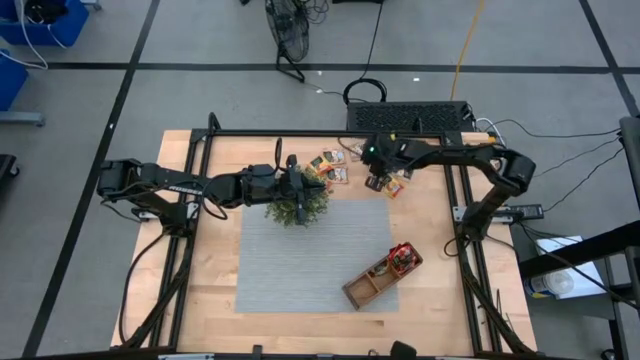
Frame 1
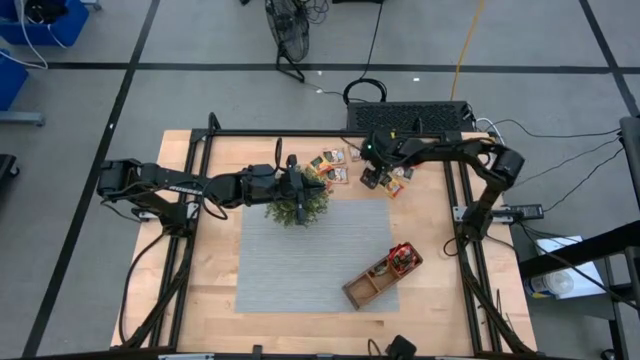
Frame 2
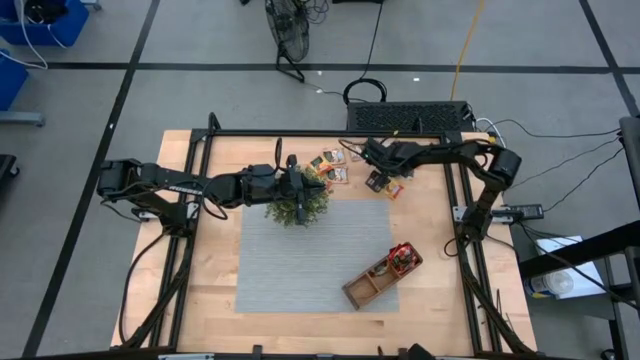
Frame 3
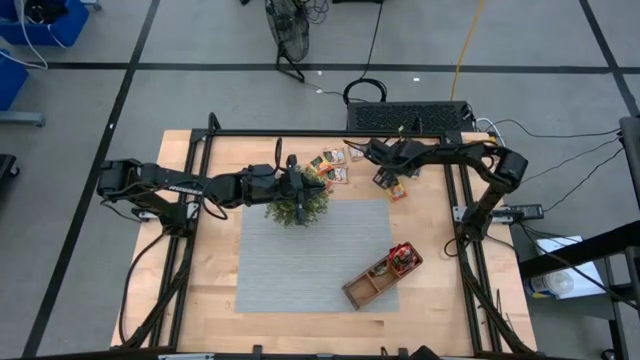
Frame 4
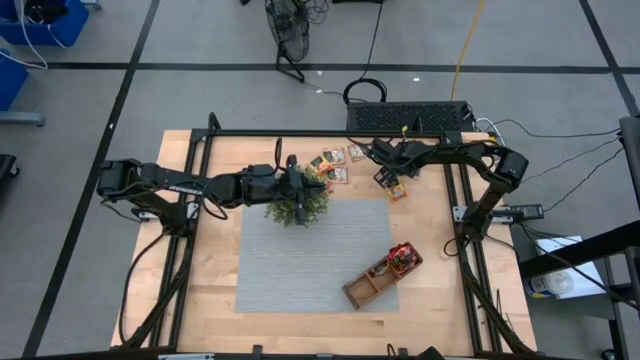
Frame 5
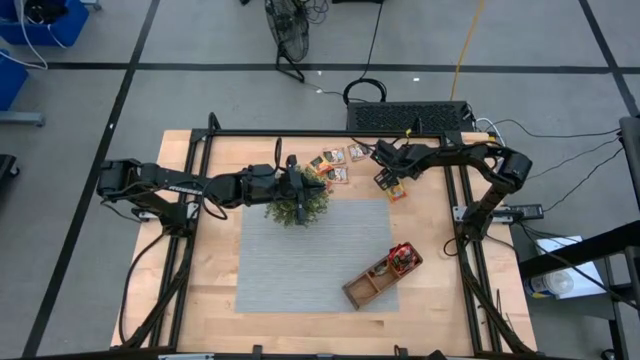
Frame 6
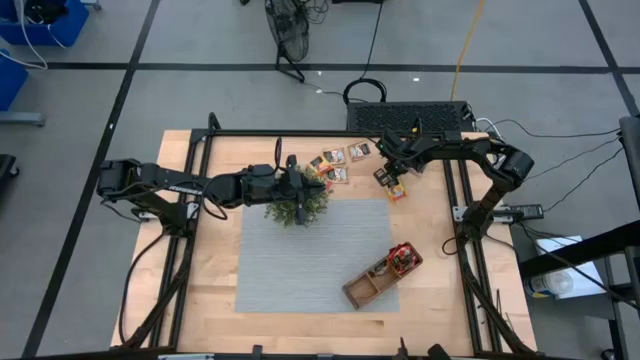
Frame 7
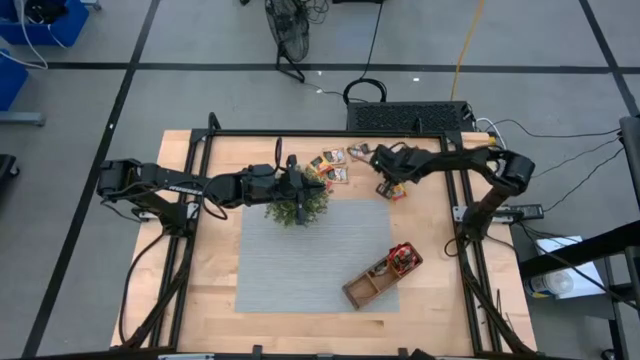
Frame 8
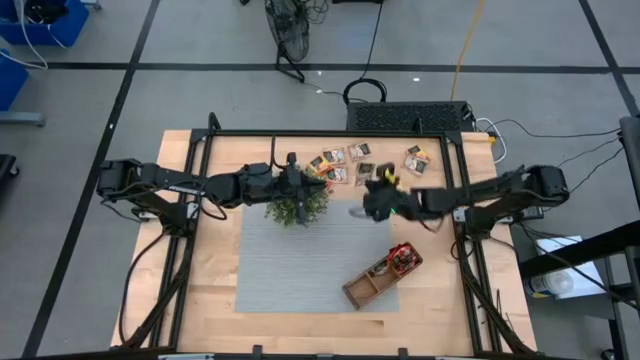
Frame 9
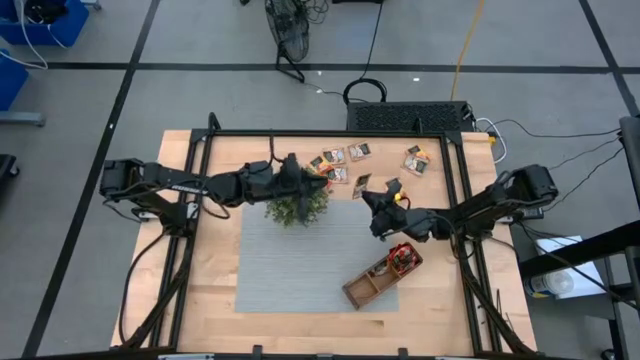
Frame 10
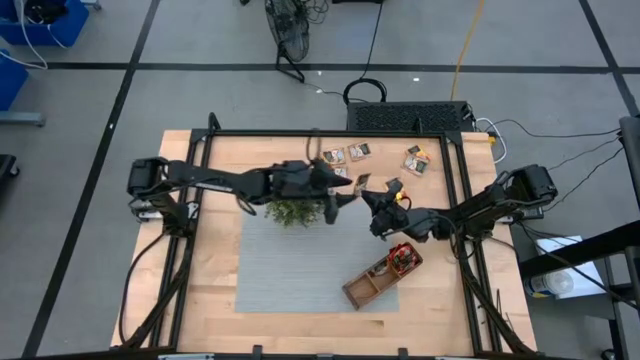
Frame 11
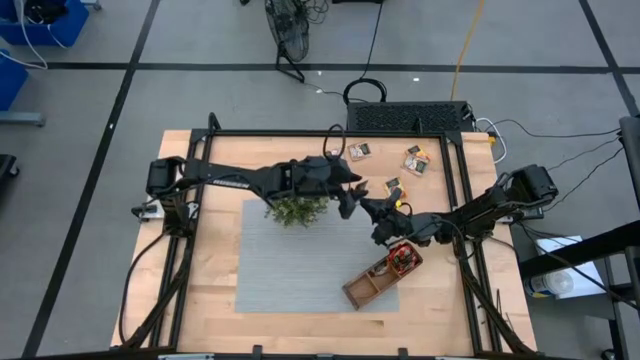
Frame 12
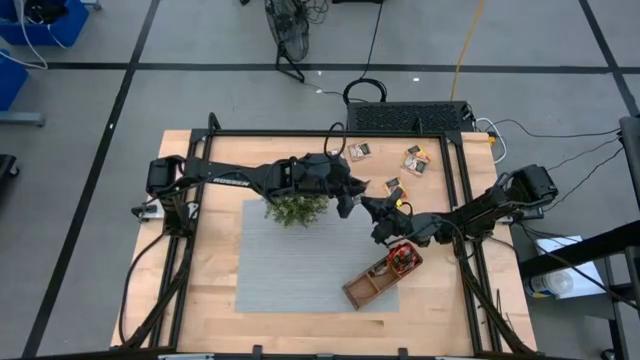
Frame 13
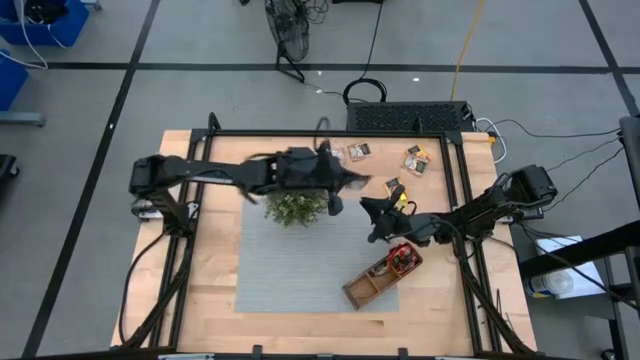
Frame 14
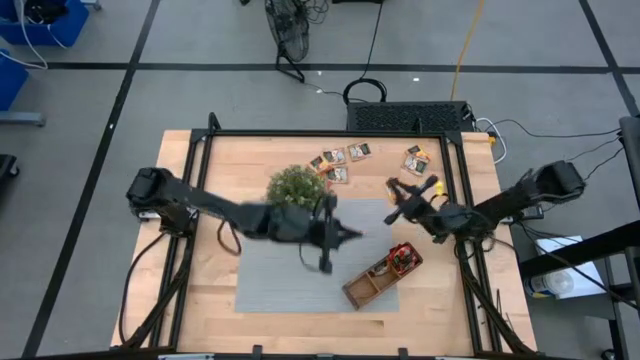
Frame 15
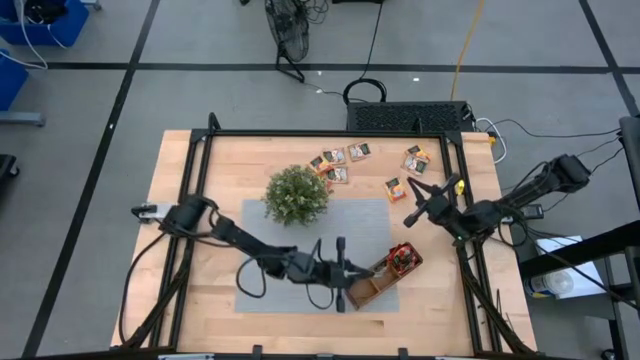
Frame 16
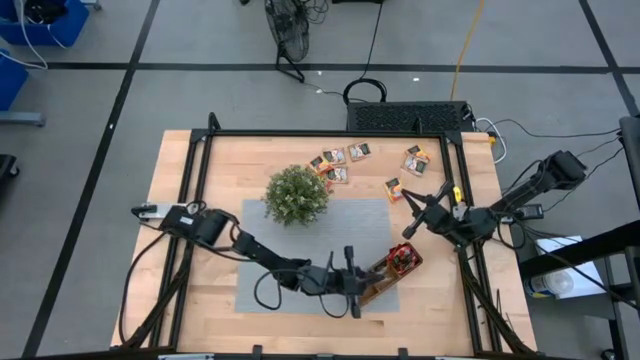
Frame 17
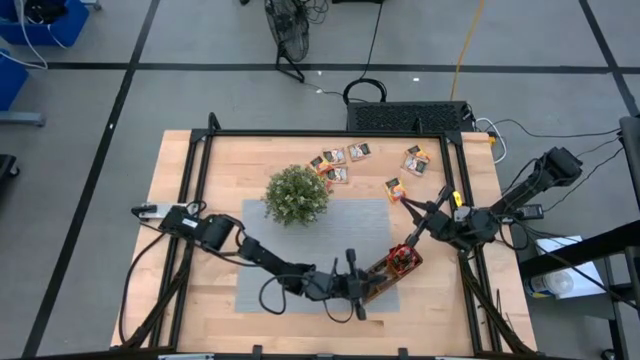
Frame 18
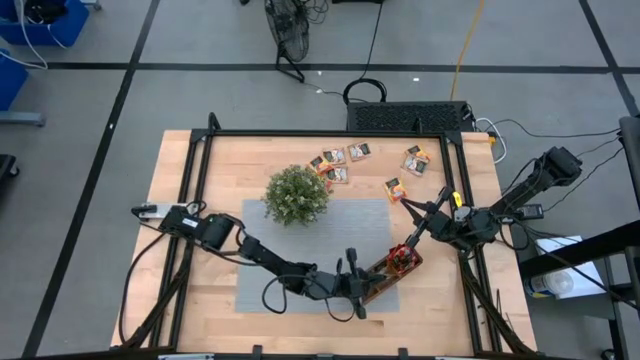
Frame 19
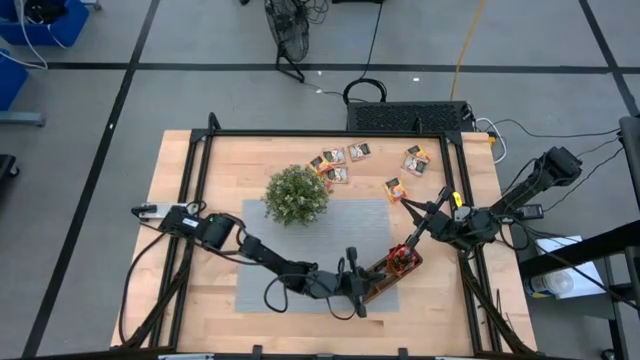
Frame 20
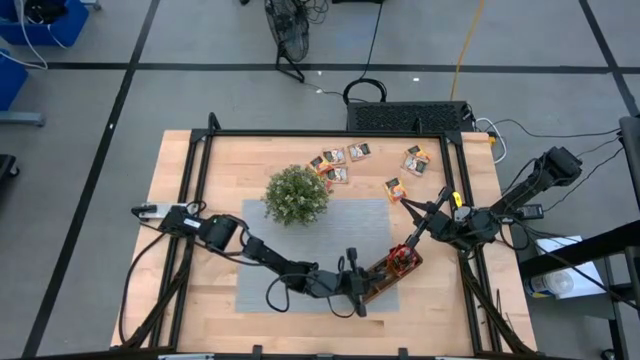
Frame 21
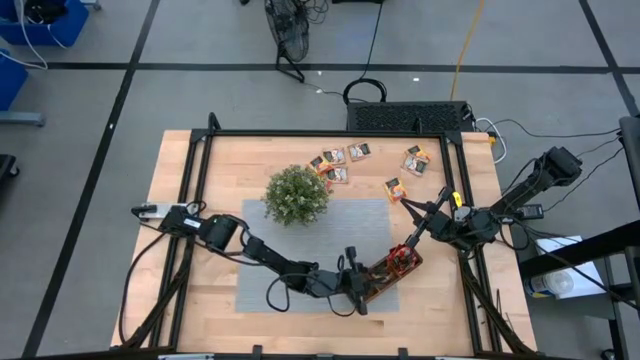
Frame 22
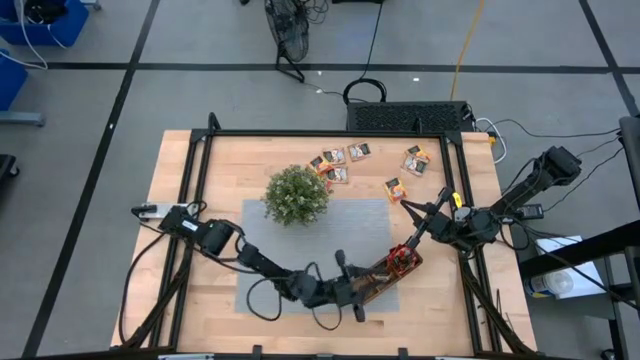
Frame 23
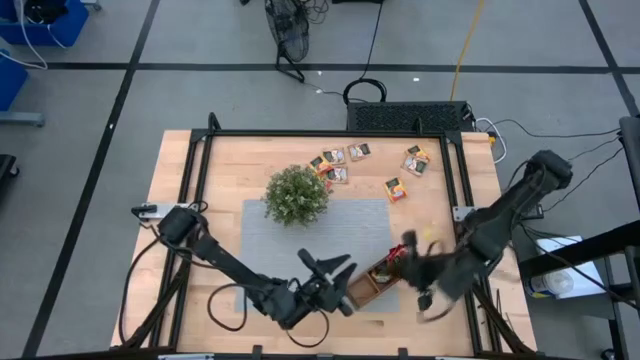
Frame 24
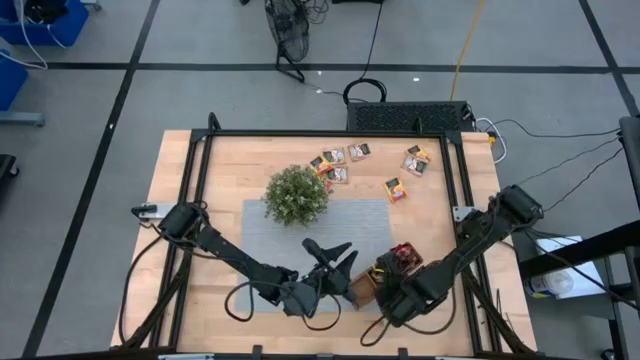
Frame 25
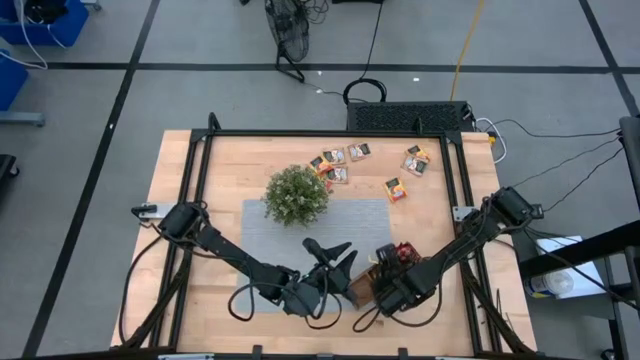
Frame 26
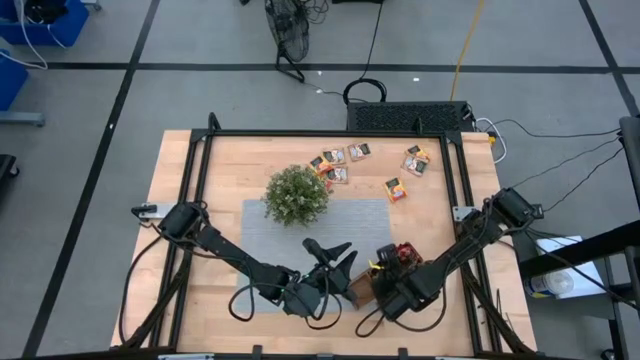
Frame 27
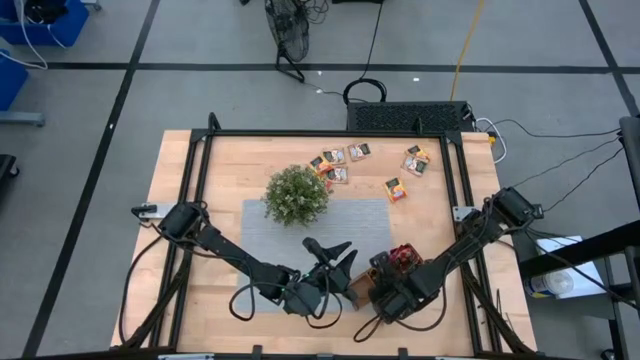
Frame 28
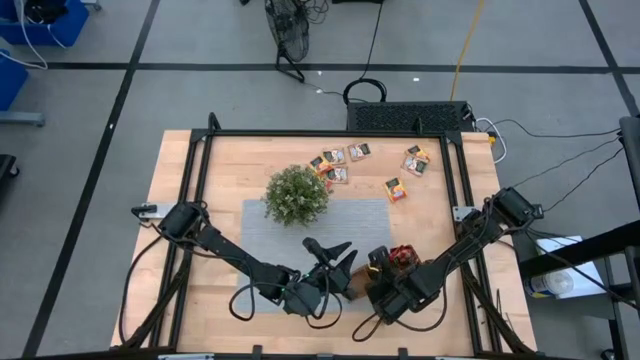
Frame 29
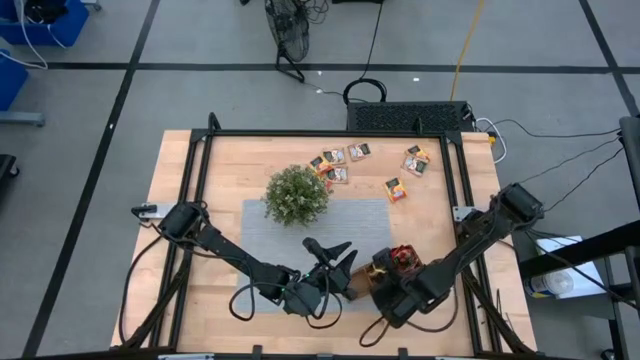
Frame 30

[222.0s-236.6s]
Task: Pick & Place Tea
Put the apple tea sachet into the brown organizer

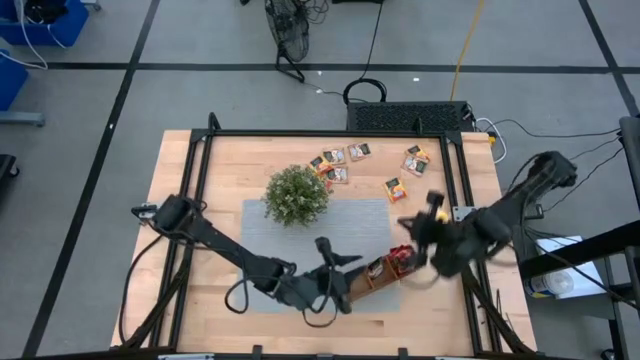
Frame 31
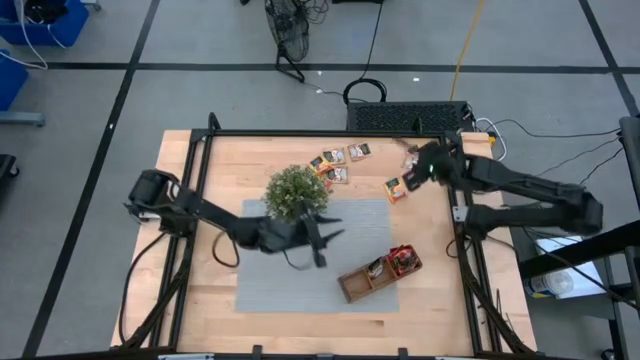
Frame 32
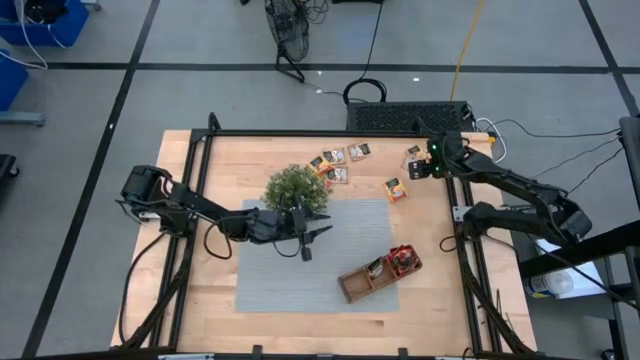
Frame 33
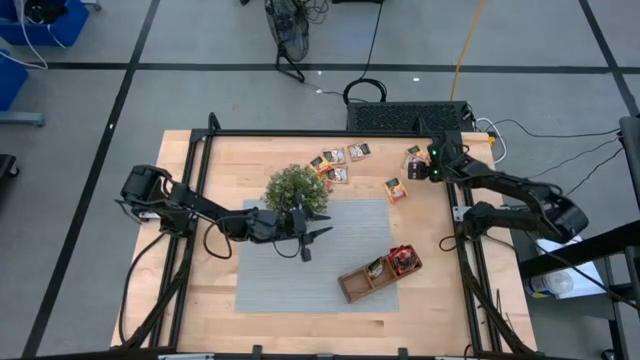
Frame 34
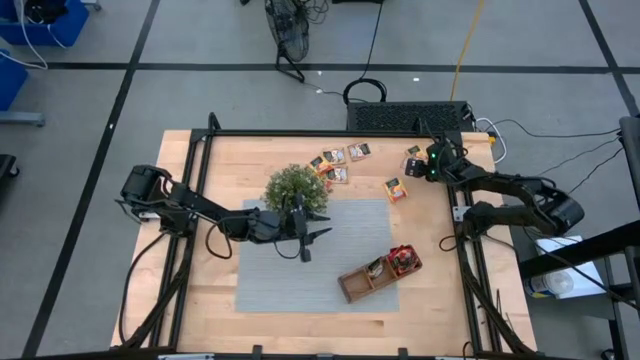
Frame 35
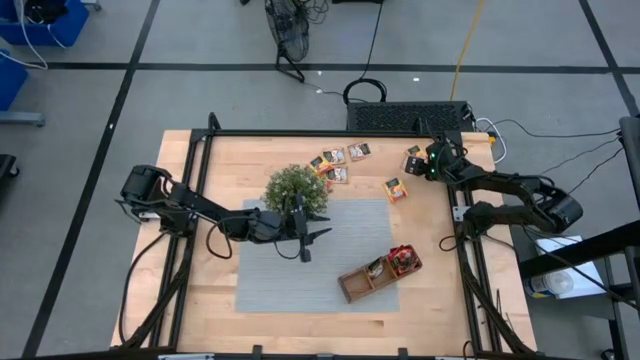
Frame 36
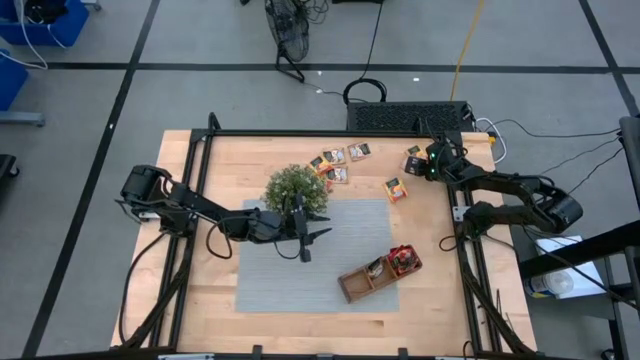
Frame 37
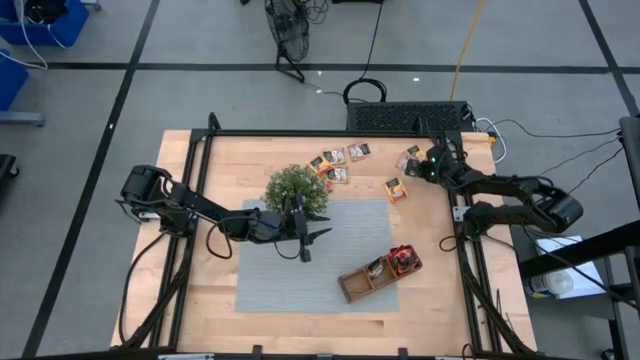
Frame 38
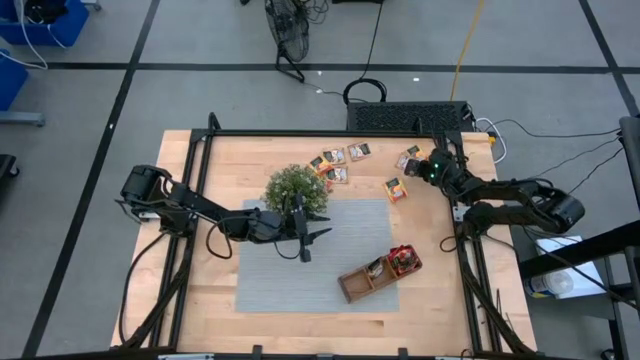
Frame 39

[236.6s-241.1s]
Put the apple tea sachet into the brown organizer
